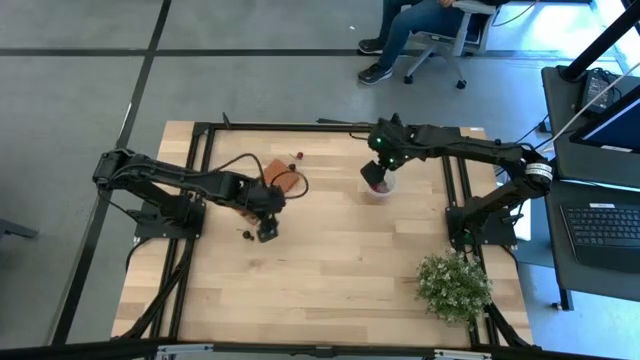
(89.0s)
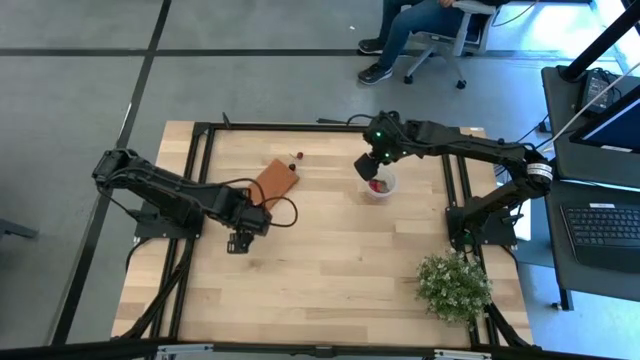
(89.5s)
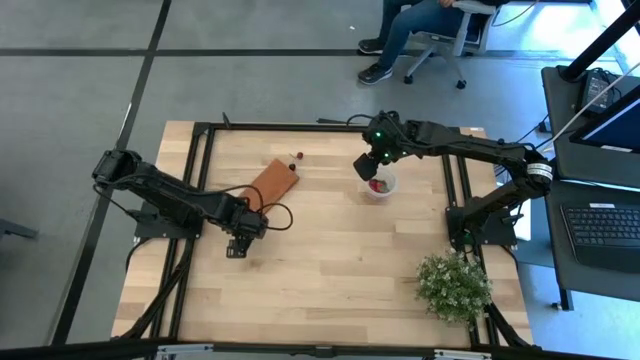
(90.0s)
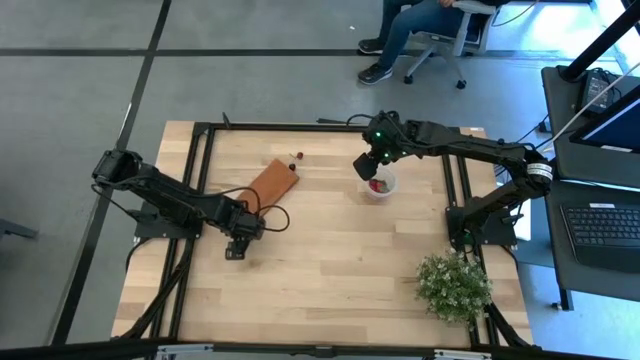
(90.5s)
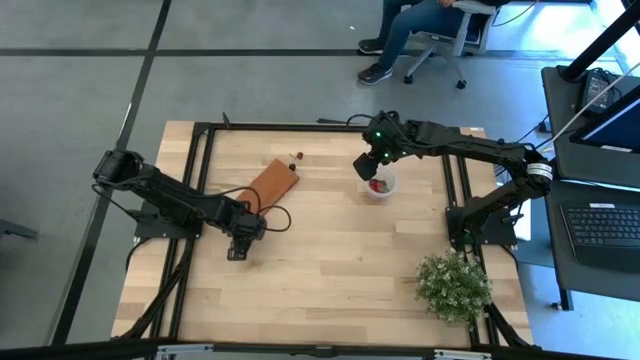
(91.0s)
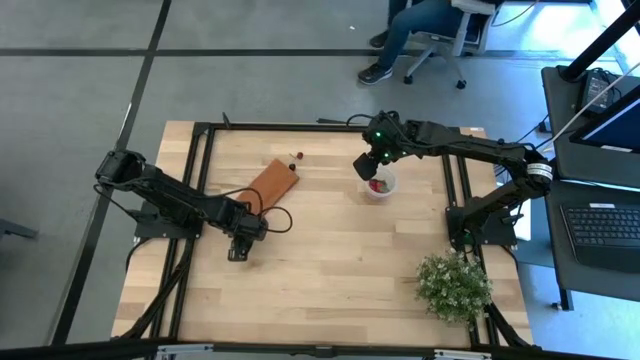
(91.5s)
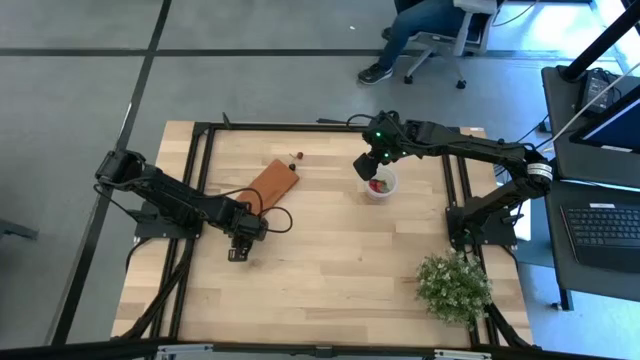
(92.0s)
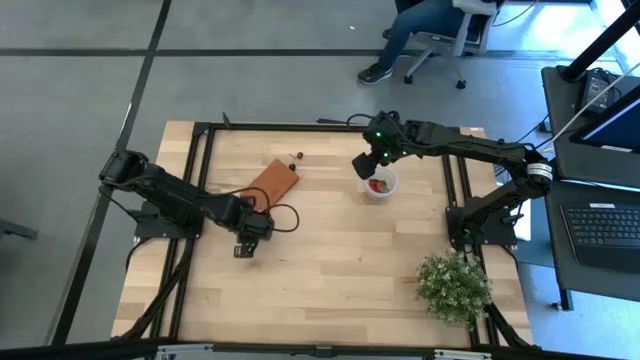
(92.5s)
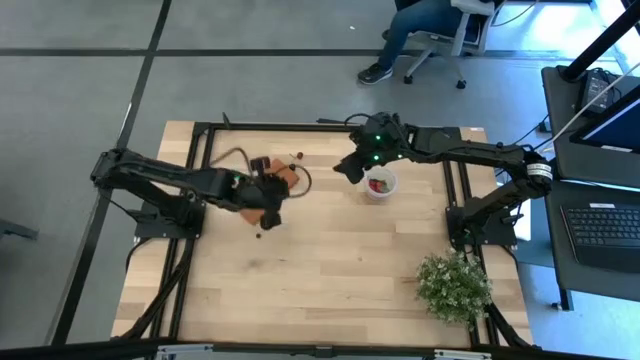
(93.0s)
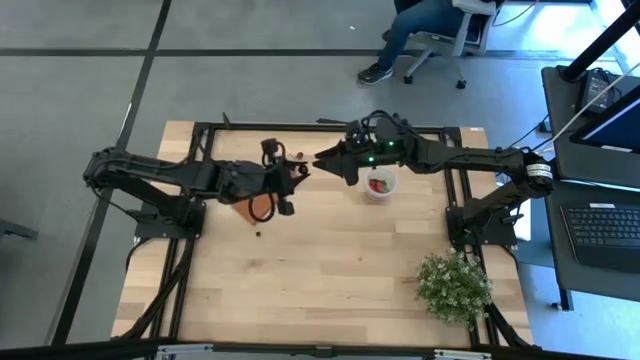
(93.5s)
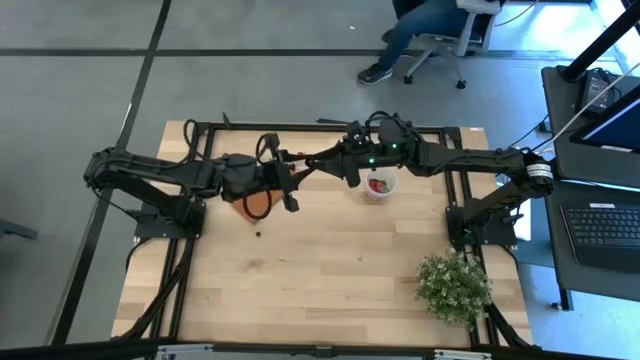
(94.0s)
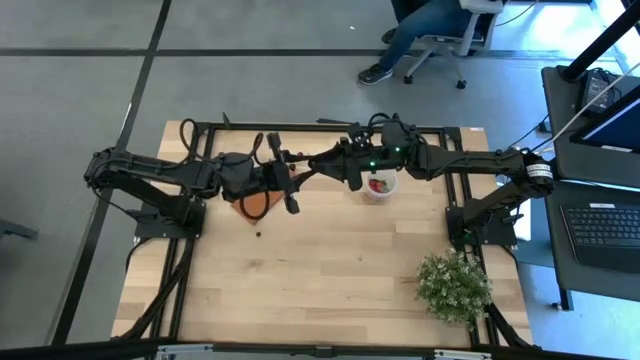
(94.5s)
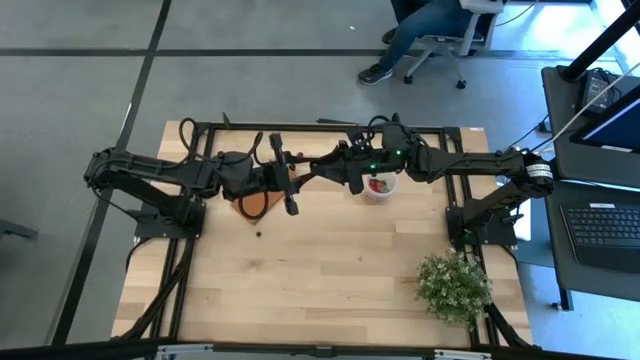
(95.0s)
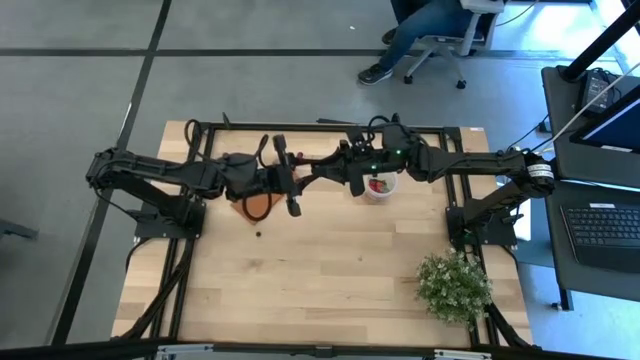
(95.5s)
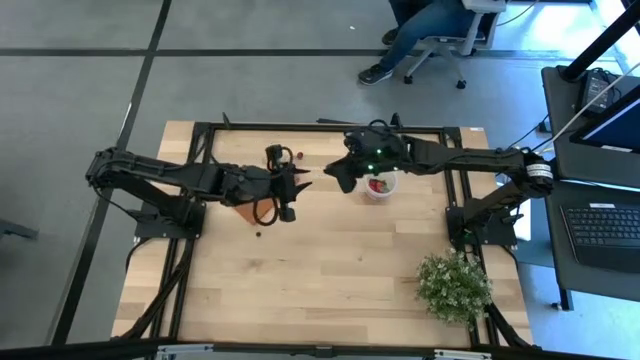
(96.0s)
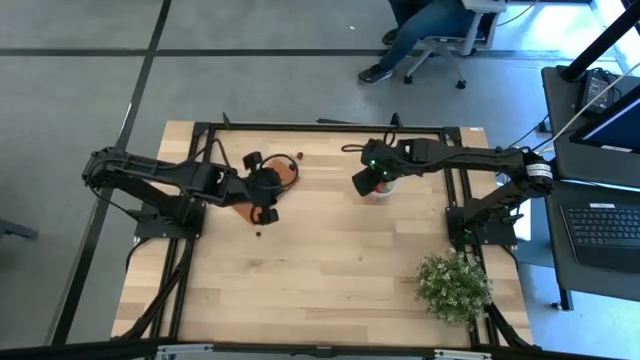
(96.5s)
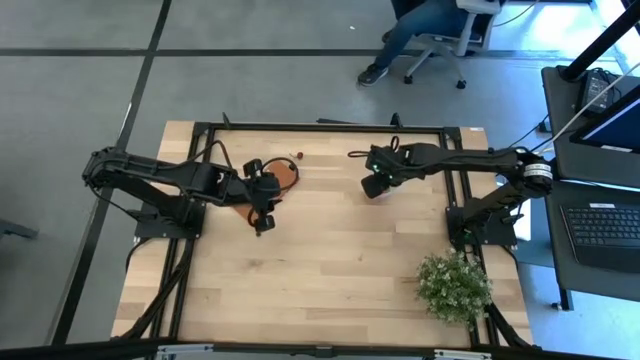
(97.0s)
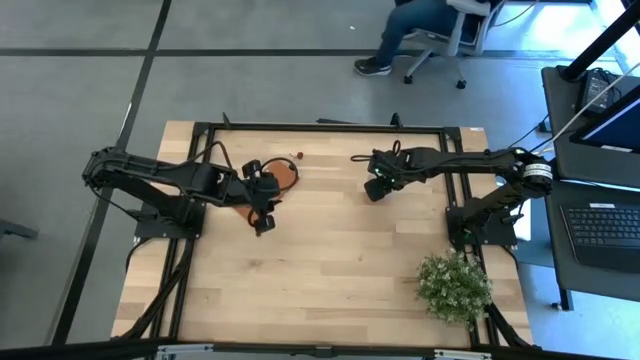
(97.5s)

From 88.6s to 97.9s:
Task: Pick and placing Produce into tupperware
Put the bottom black cherry into the transparent container

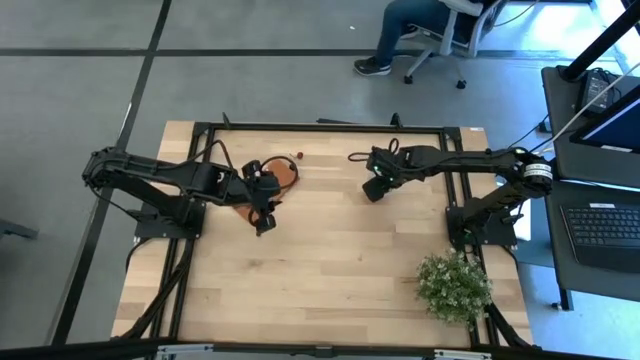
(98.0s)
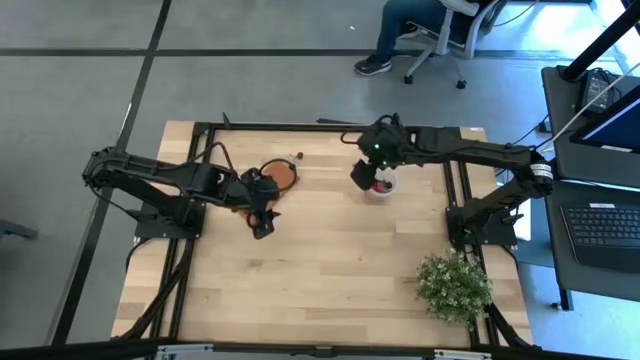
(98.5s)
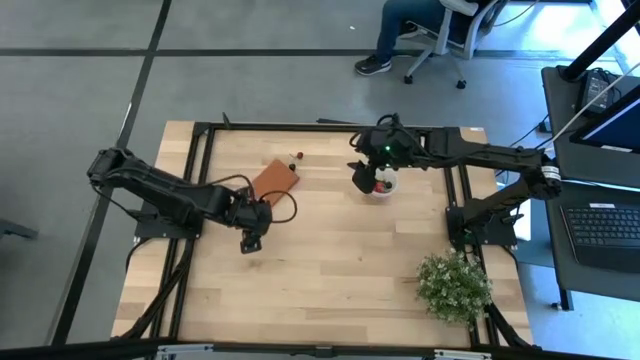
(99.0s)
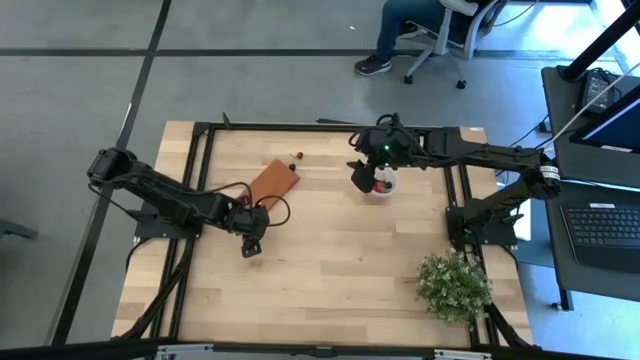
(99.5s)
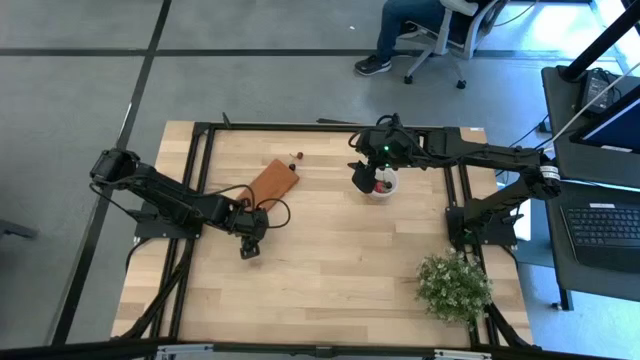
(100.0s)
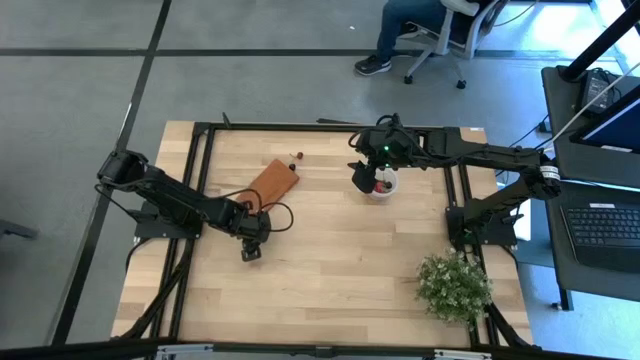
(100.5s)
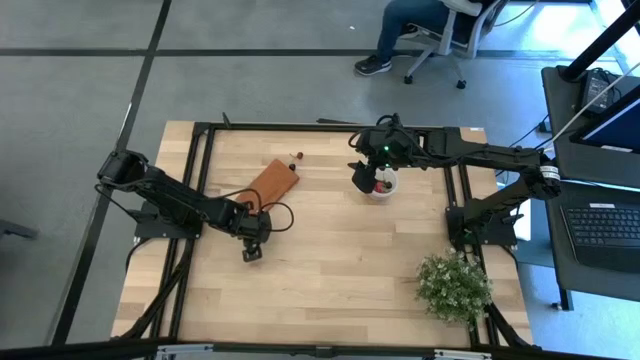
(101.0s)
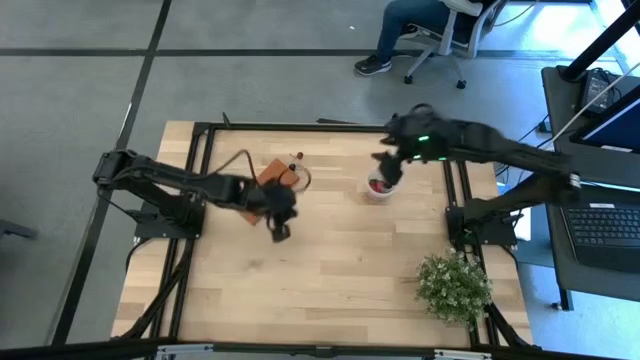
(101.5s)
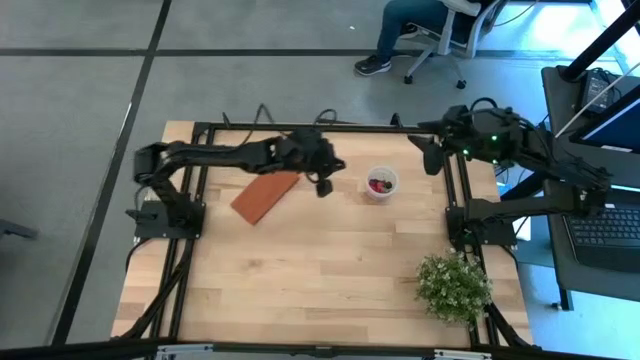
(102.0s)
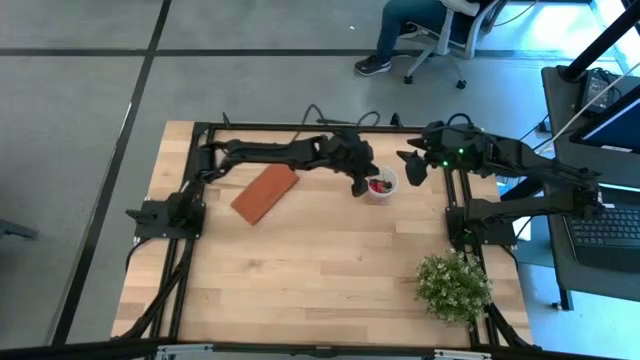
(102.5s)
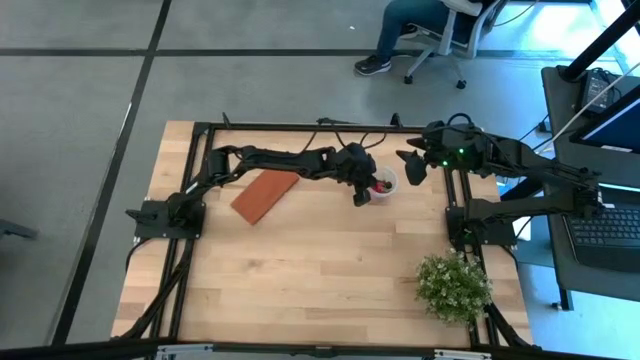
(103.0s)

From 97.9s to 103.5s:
Put the blueberry into the transparent container

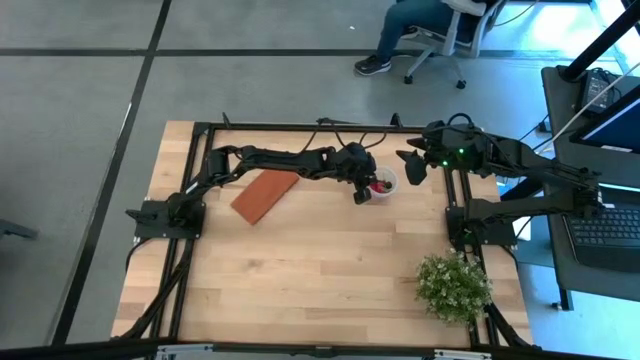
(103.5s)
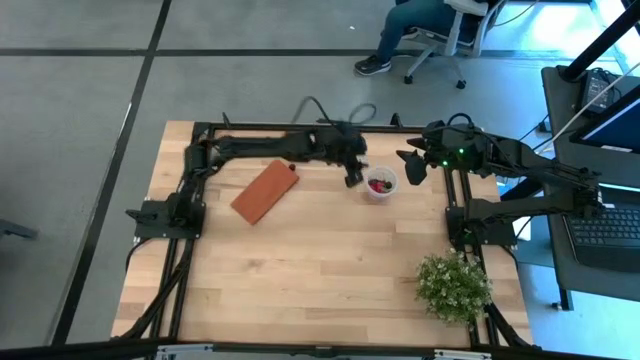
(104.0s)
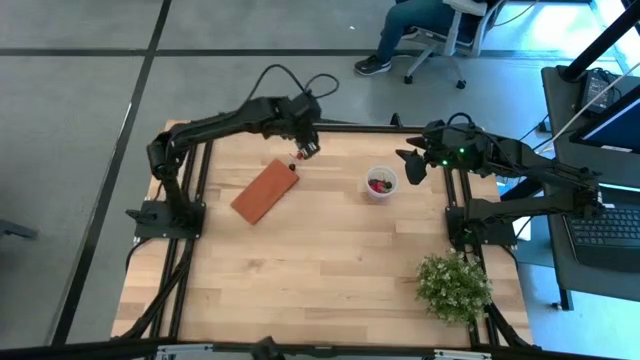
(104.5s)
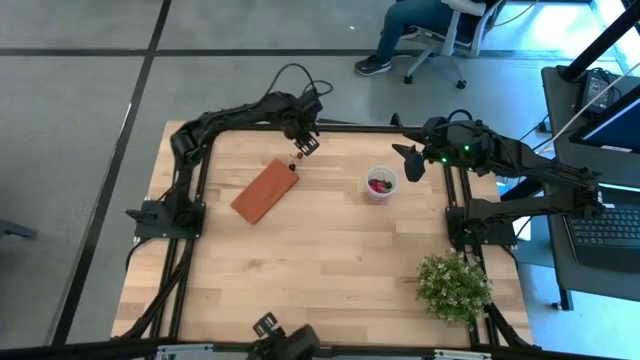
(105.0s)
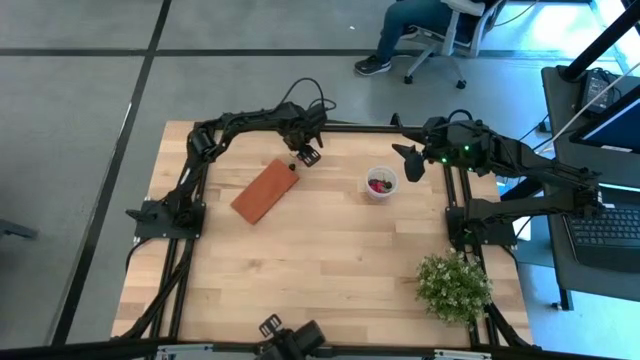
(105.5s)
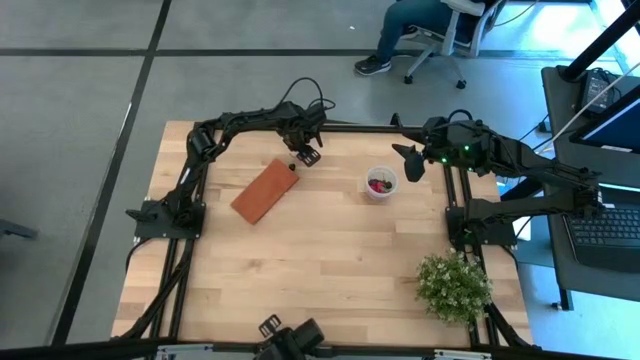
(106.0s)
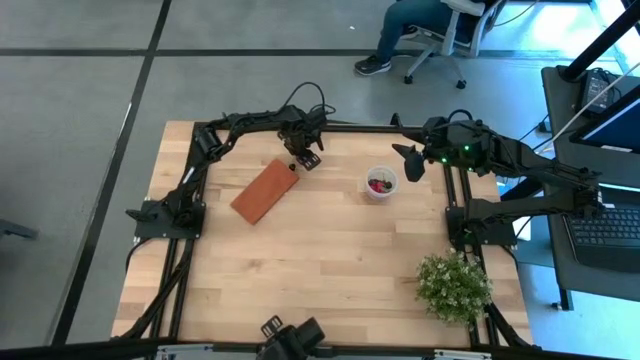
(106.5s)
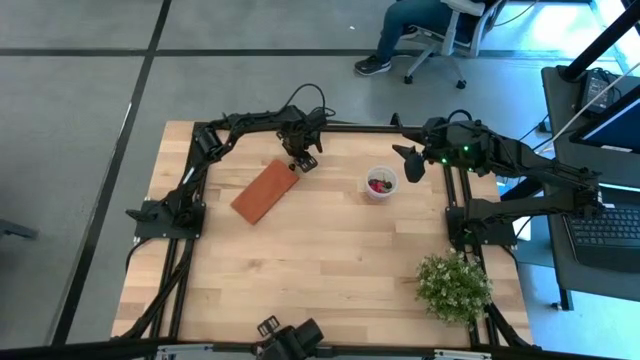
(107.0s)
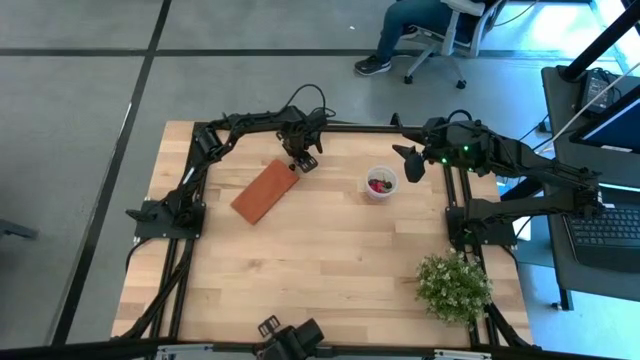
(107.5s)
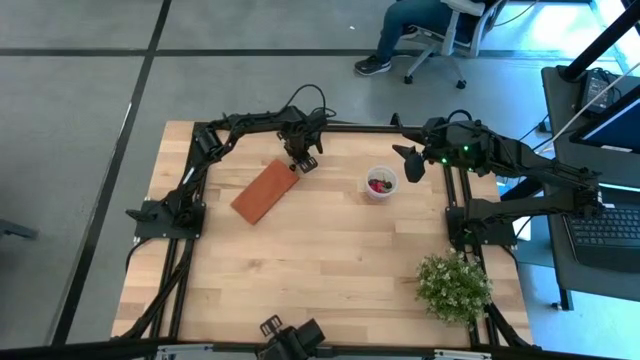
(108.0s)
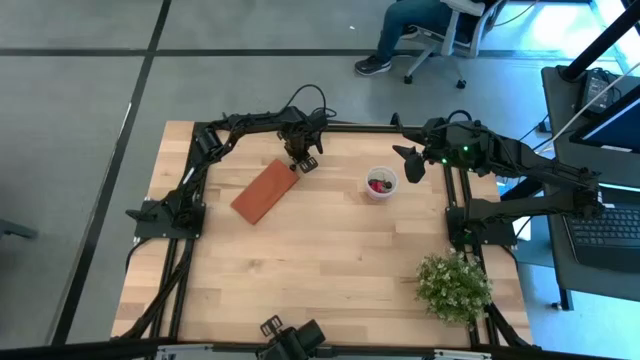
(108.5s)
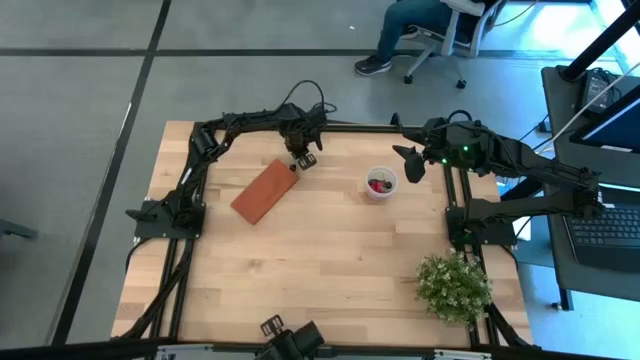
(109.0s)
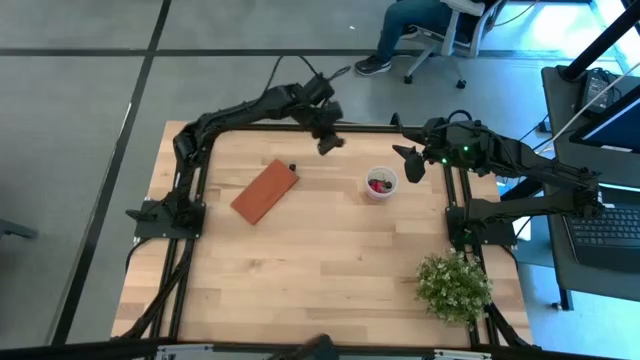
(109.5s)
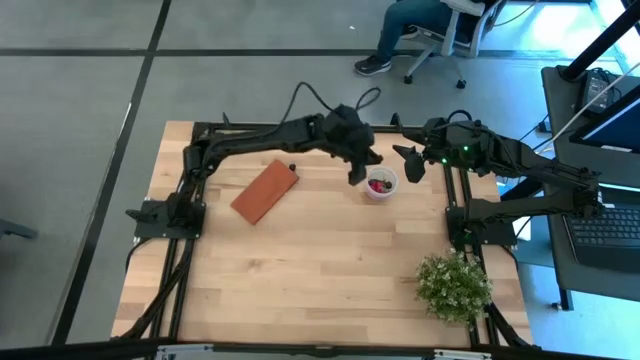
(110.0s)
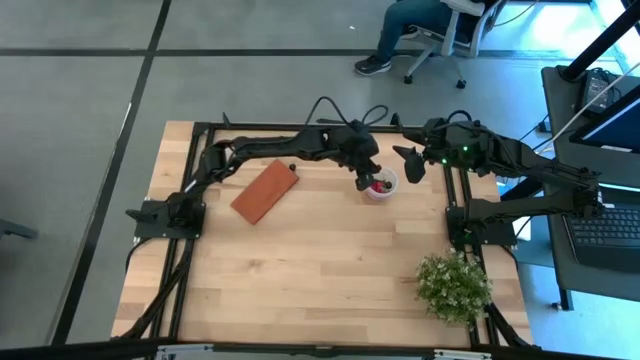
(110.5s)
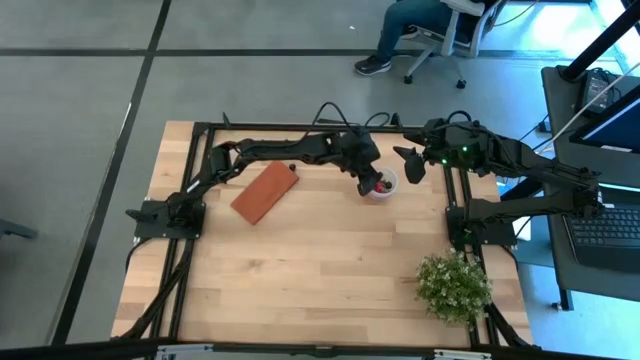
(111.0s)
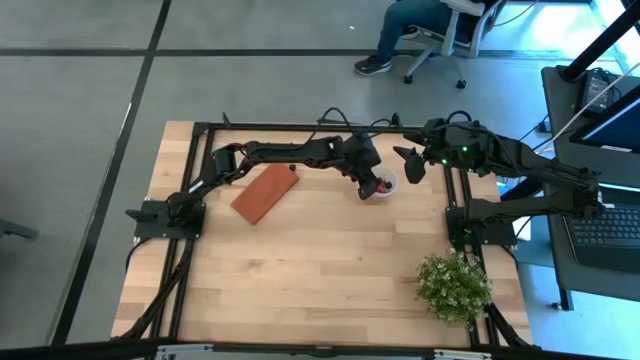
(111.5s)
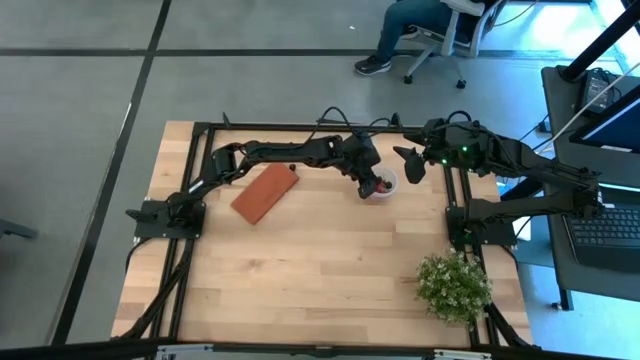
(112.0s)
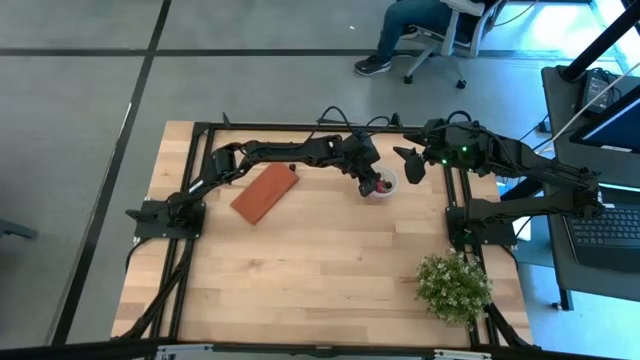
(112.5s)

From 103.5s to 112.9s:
Put the red cherry into the transparent container
